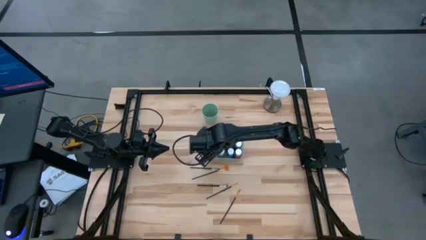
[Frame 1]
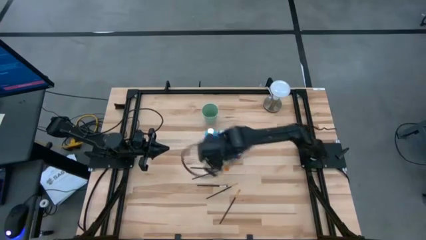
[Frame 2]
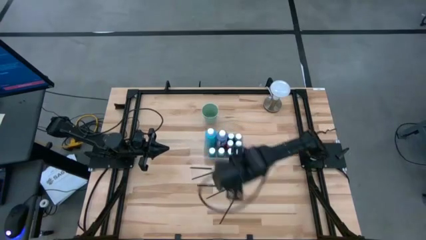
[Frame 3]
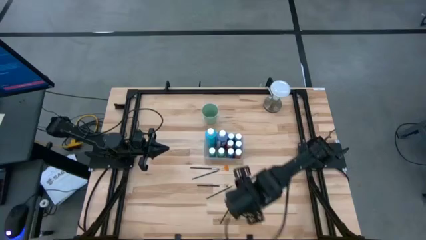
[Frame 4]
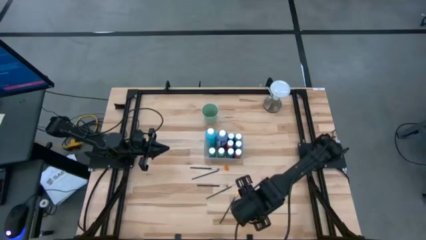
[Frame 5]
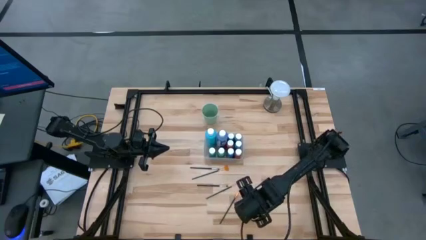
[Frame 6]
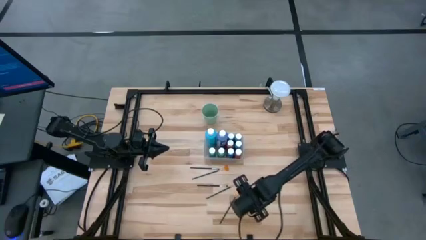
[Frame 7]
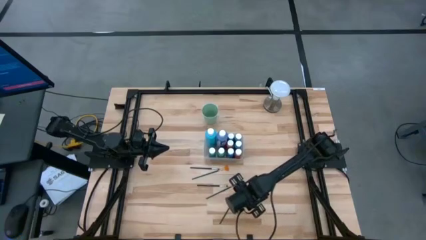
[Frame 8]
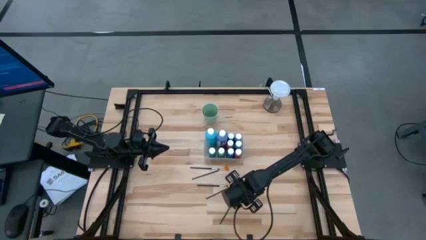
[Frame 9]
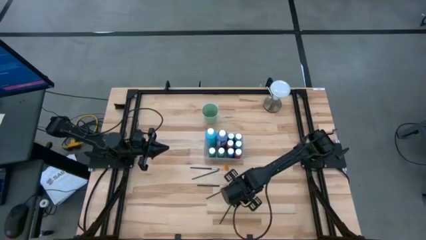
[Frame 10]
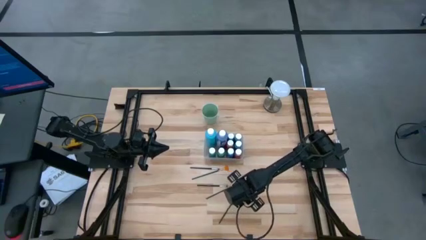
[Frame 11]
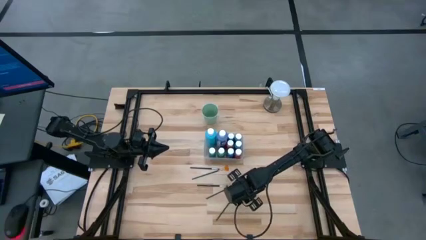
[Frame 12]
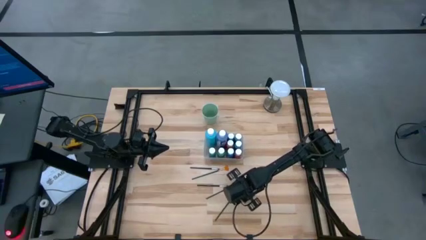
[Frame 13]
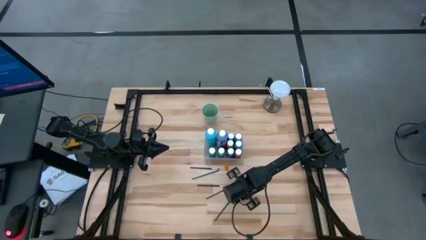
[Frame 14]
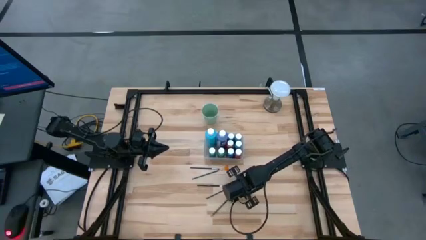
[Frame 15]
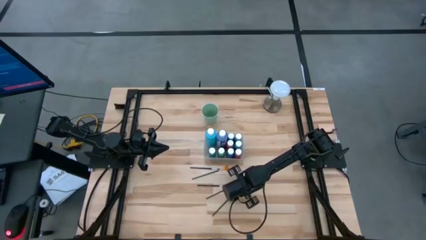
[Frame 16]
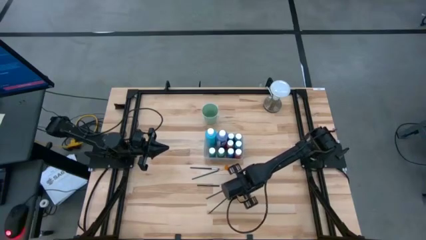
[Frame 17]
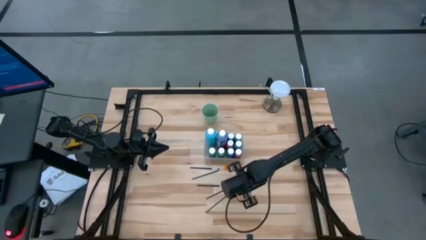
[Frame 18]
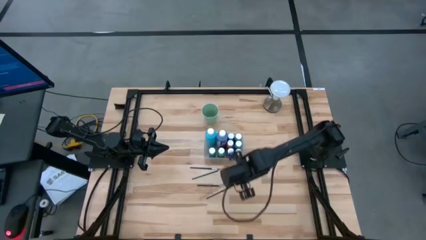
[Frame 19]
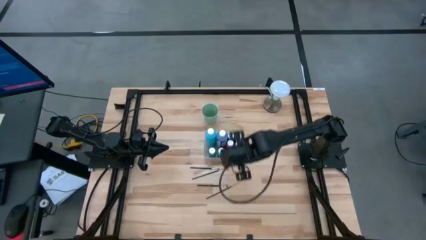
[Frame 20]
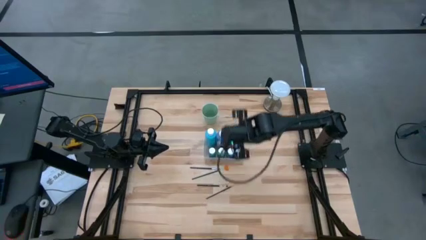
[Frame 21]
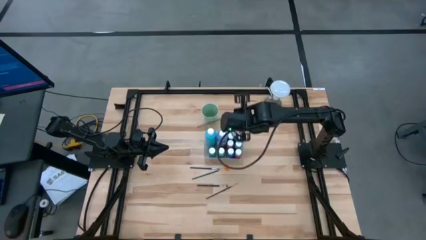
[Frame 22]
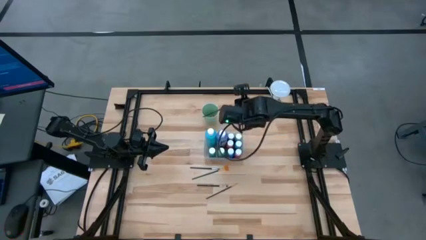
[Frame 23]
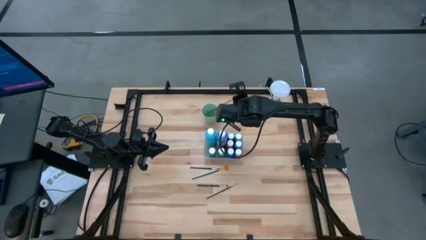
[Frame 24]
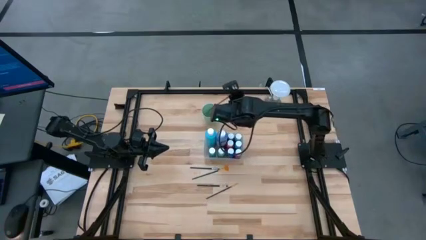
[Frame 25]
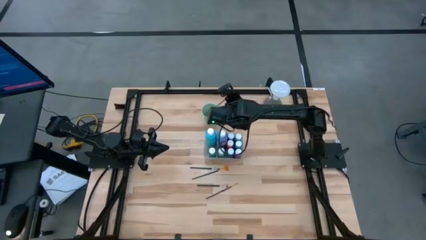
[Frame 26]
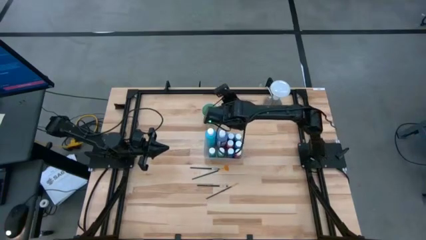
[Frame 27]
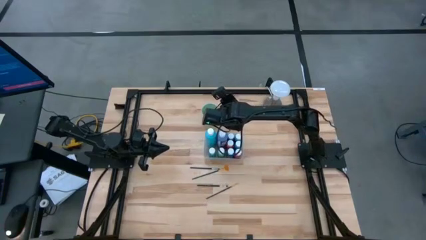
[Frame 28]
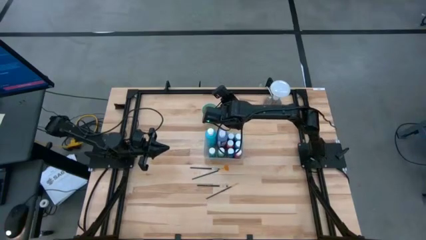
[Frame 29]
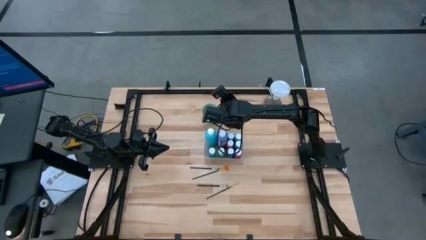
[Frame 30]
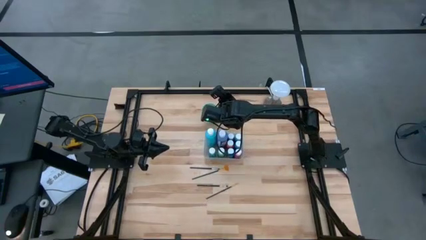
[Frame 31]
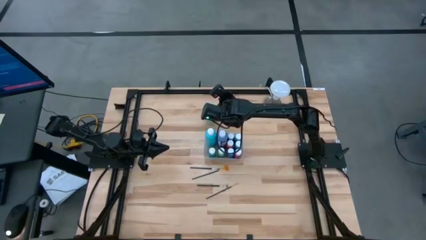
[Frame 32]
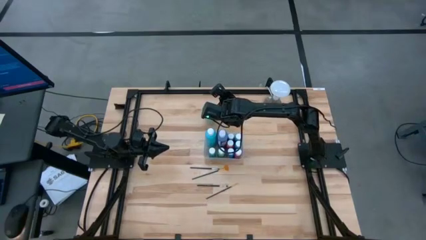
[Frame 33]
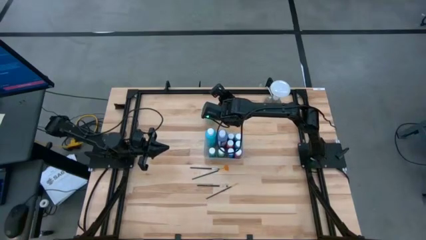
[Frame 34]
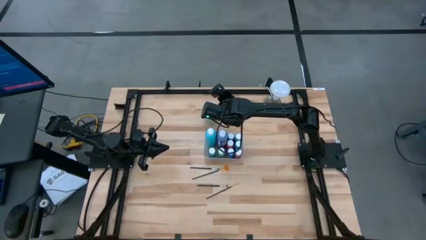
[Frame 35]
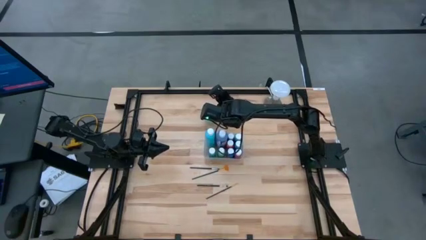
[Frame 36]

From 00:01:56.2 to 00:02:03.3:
Task: Pick & Place Paint Supplies
Put the black brush into the green cup

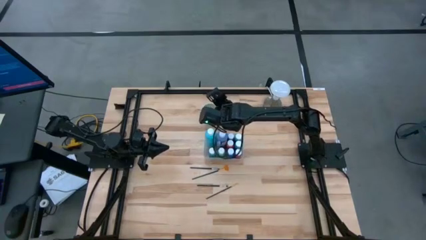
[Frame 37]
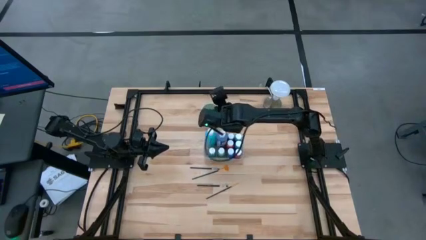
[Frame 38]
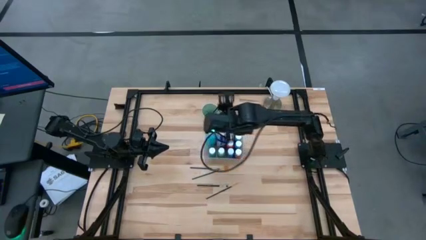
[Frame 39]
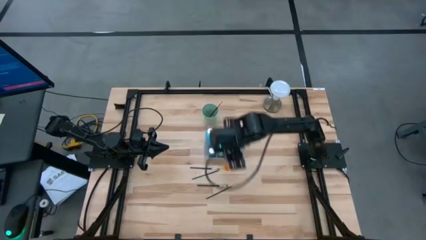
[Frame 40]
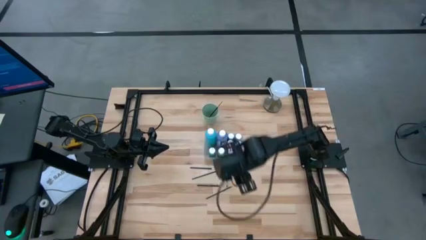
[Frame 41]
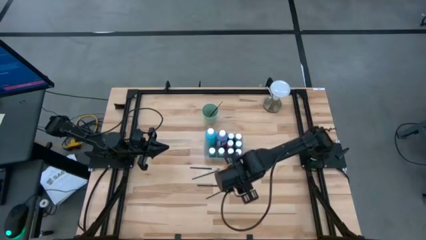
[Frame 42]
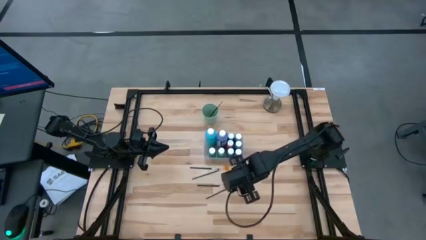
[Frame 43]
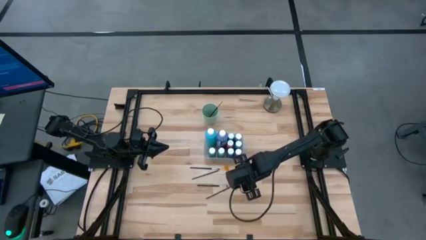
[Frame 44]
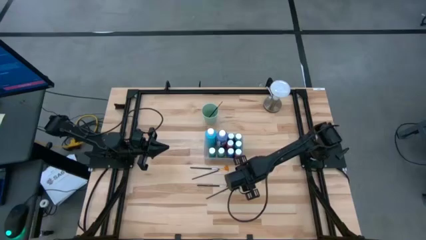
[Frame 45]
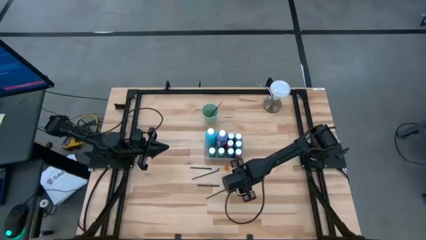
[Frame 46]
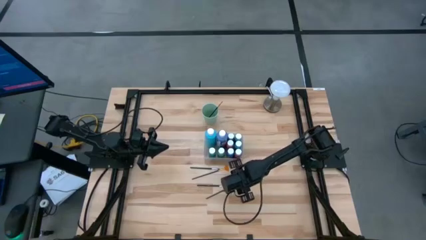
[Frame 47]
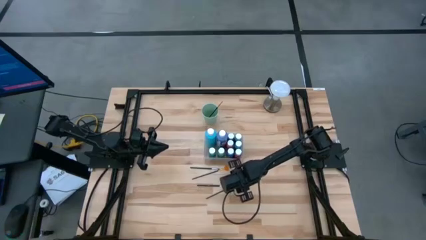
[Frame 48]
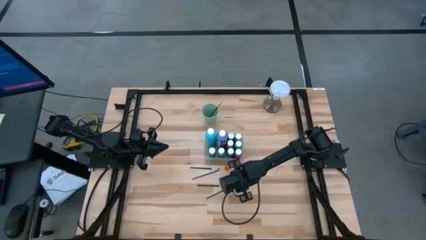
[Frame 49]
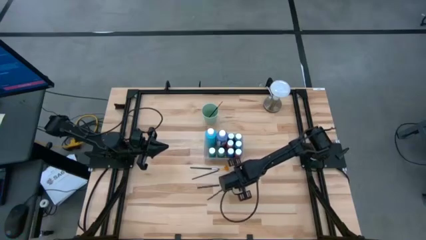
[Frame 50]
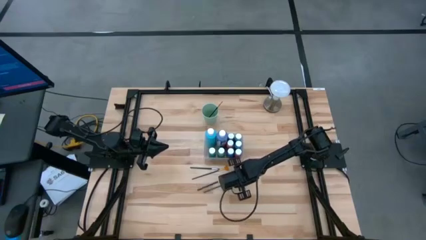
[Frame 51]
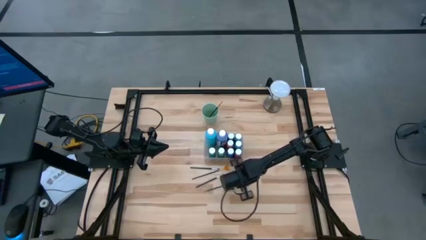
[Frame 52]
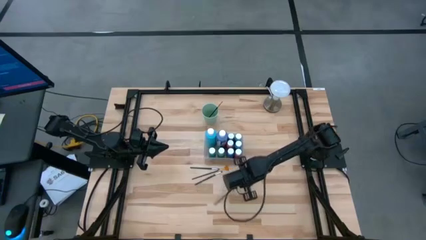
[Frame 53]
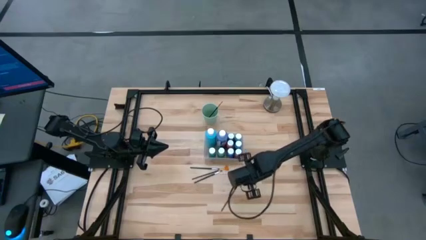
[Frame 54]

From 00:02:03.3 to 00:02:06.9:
Put the black brush into the green cup

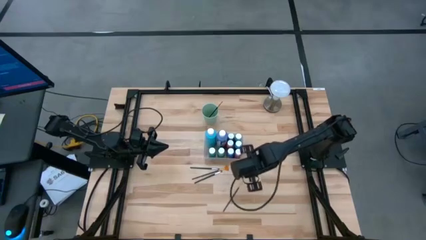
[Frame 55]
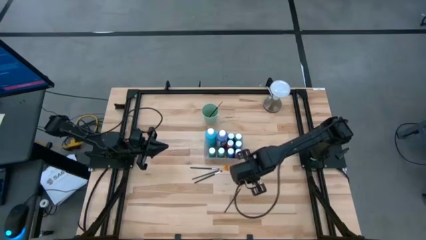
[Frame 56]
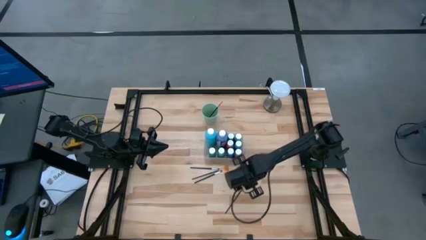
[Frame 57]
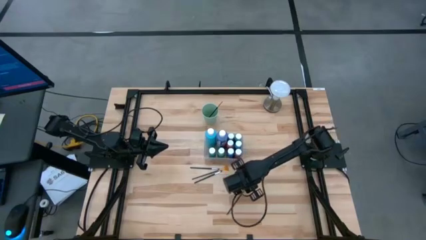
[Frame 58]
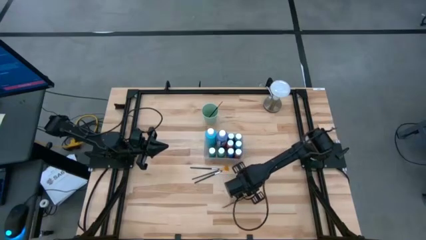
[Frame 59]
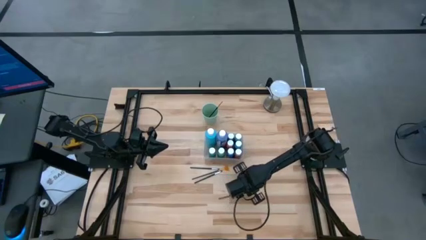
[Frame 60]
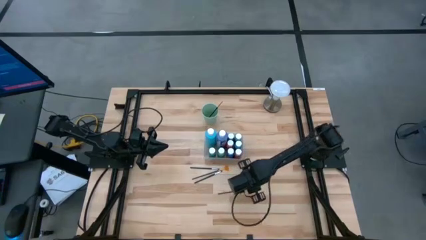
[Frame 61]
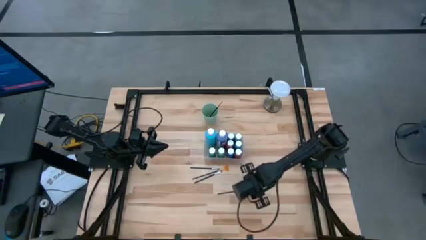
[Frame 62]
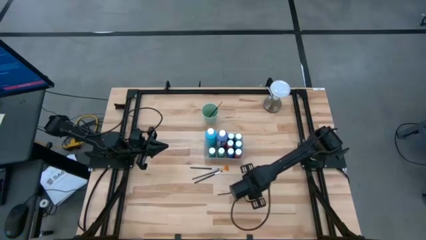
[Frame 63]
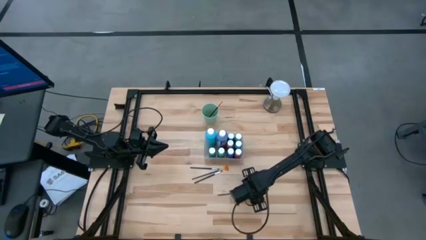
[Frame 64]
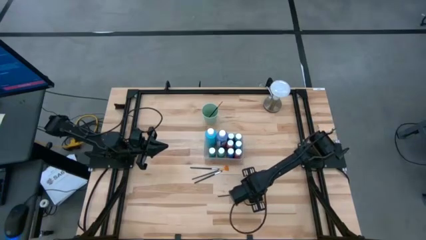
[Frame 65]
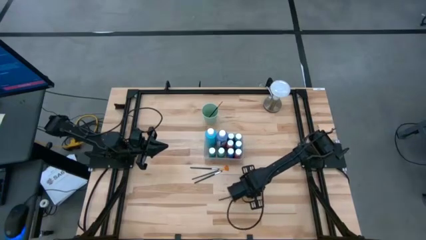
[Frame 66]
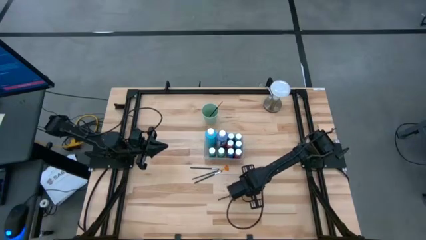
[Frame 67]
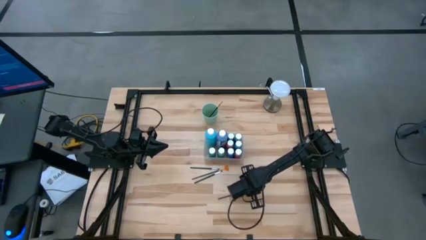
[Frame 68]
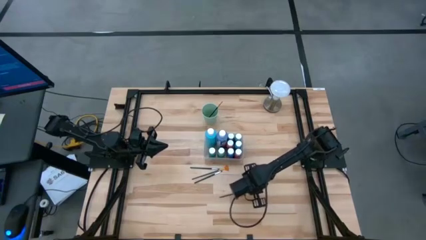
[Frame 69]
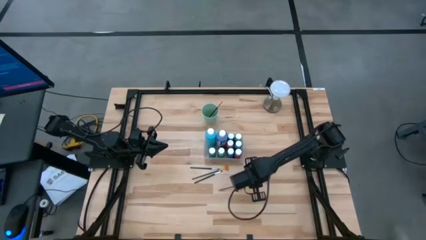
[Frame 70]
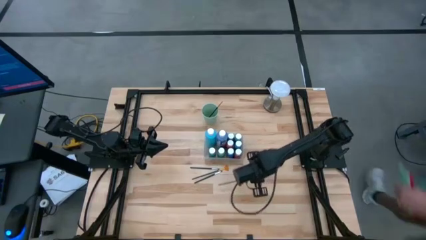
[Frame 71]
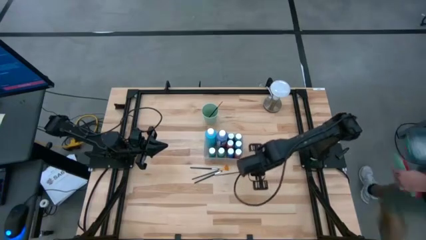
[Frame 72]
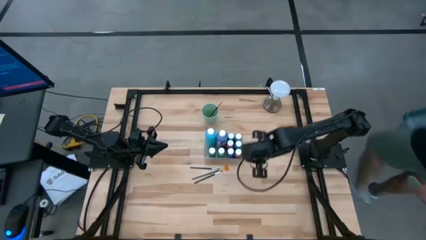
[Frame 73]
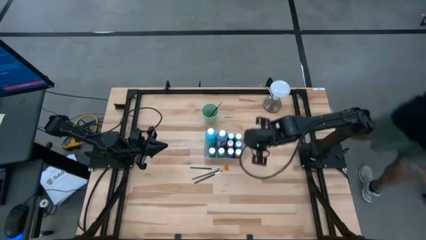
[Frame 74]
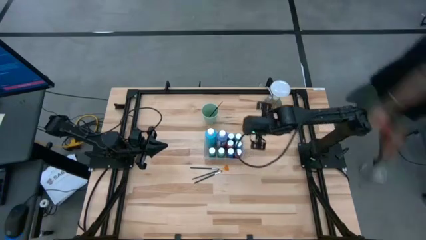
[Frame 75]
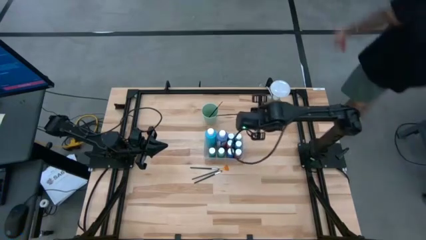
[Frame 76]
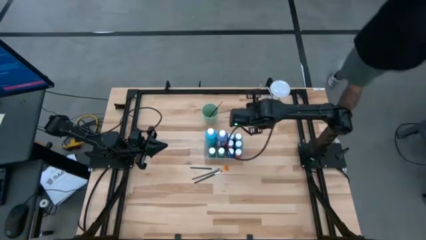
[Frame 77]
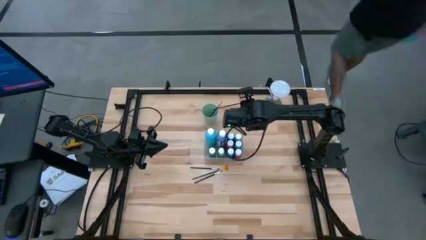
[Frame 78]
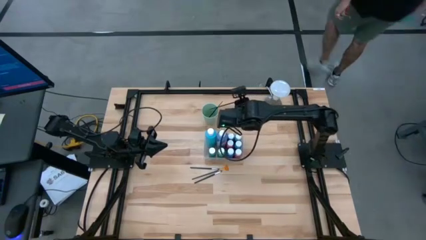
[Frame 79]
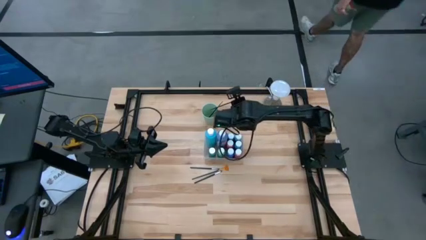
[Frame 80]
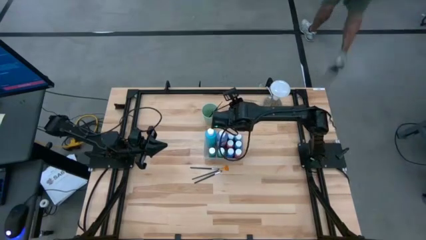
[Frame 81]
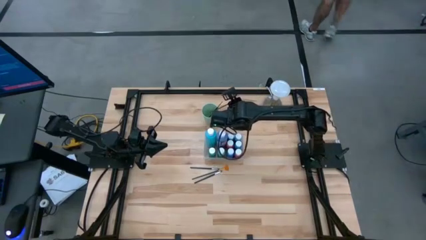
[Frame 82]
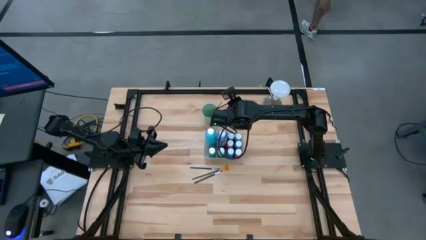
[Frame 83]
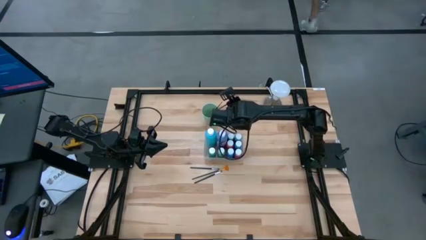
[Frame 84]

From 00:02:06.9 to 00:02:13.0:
Put the black brush into the green cup
